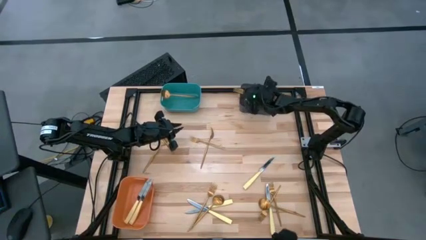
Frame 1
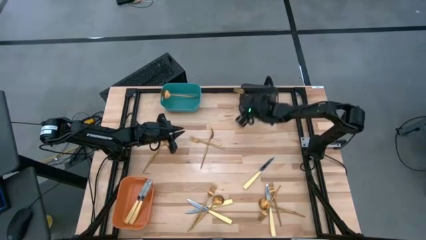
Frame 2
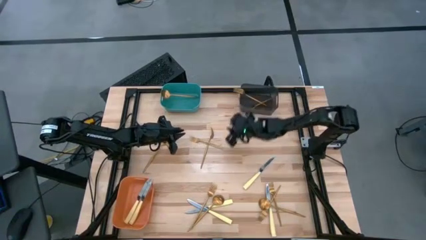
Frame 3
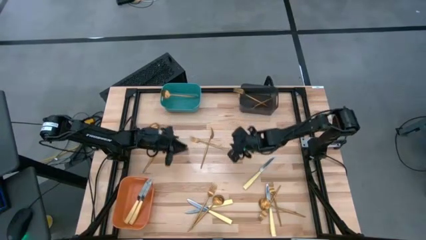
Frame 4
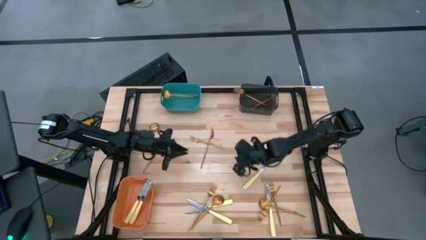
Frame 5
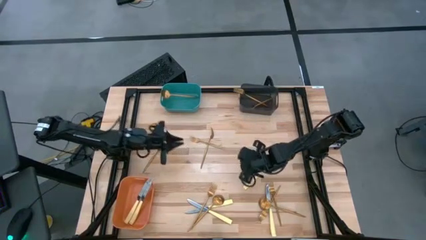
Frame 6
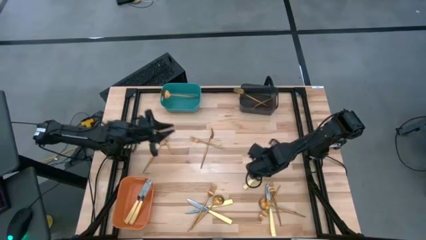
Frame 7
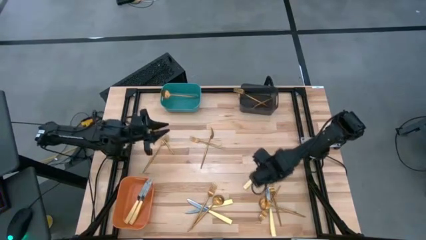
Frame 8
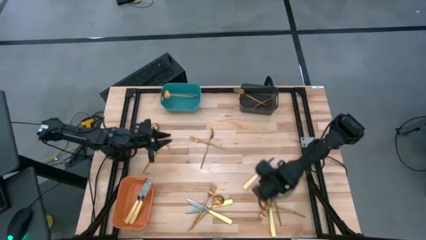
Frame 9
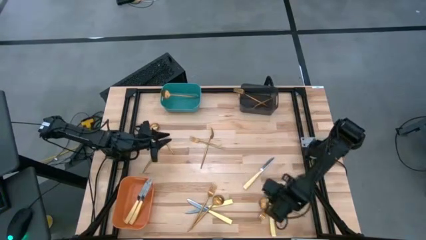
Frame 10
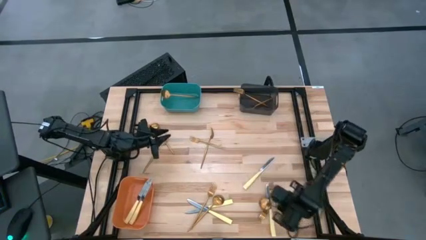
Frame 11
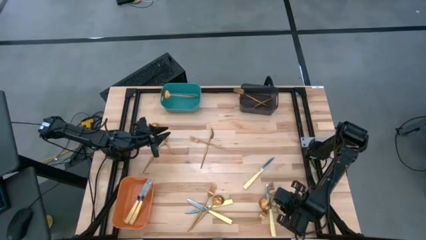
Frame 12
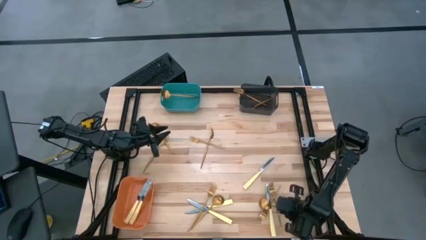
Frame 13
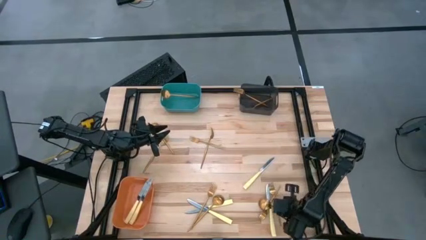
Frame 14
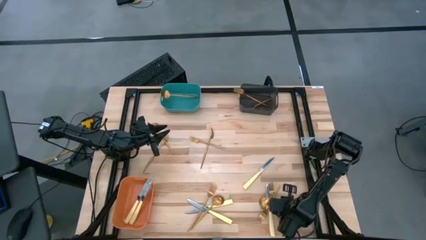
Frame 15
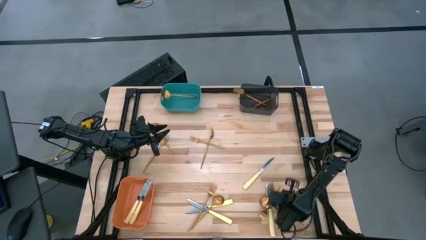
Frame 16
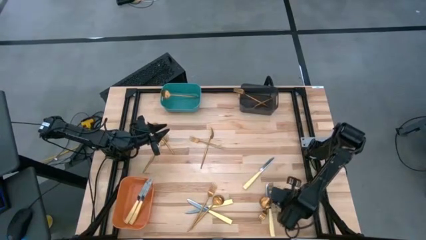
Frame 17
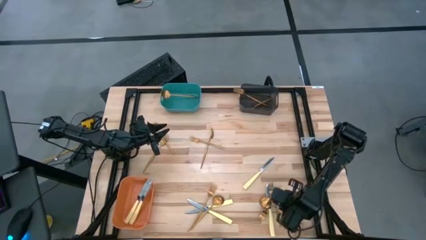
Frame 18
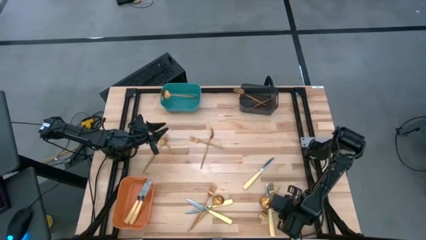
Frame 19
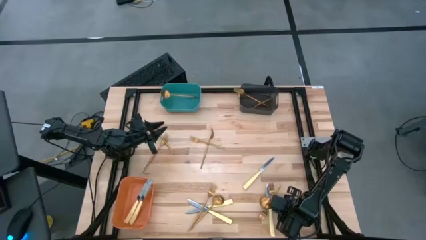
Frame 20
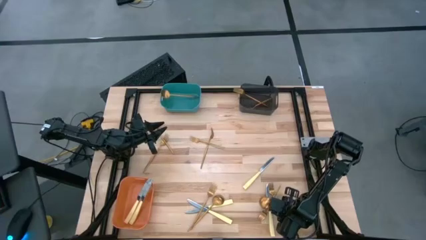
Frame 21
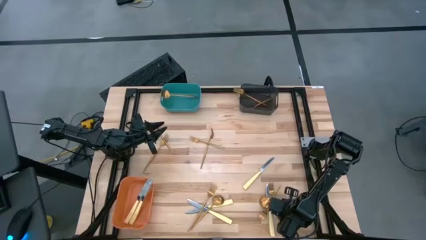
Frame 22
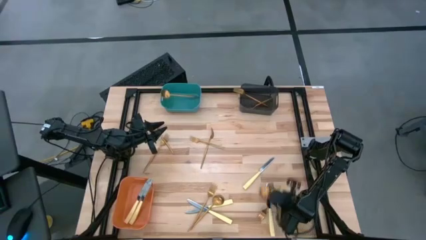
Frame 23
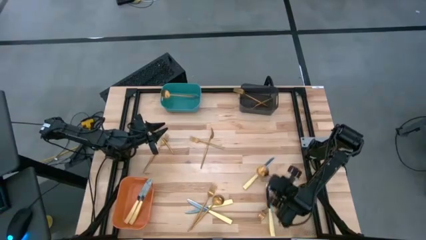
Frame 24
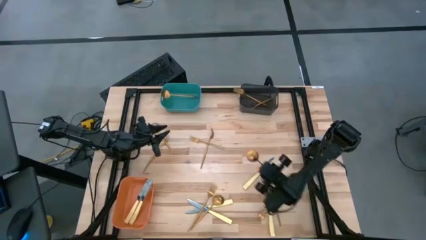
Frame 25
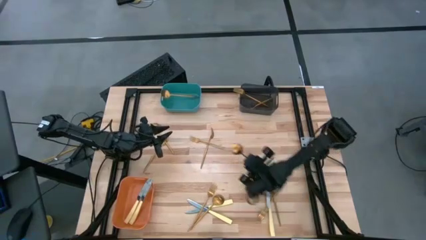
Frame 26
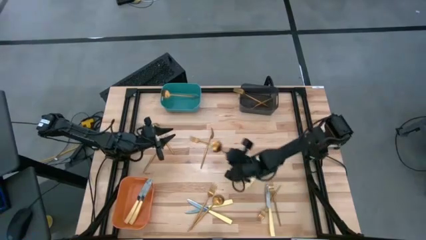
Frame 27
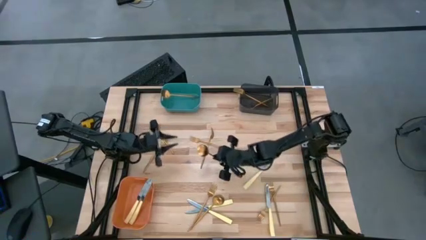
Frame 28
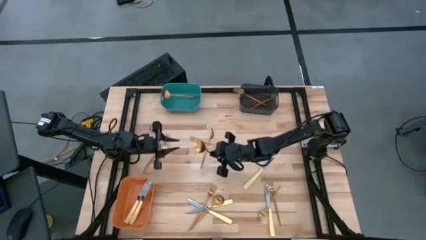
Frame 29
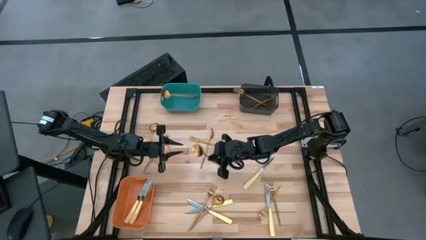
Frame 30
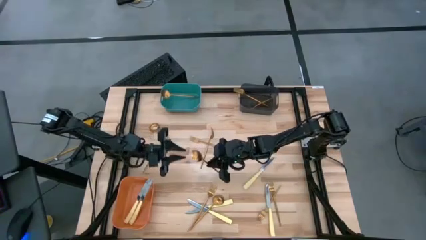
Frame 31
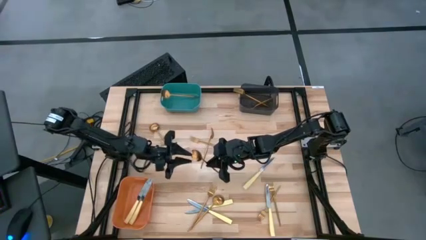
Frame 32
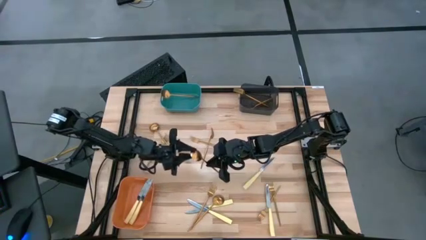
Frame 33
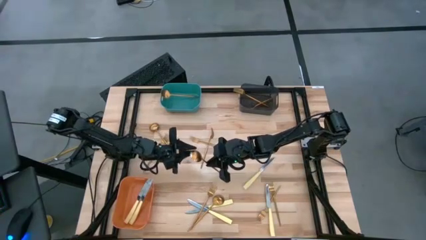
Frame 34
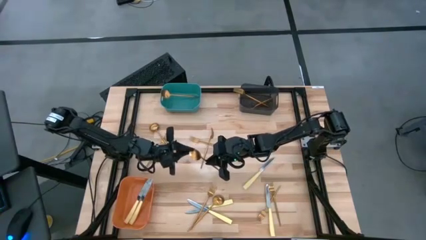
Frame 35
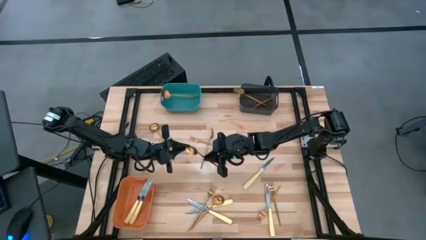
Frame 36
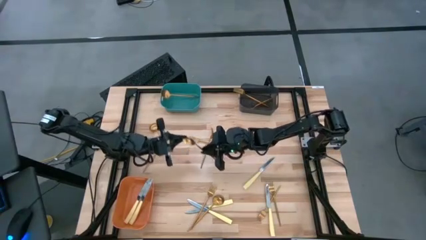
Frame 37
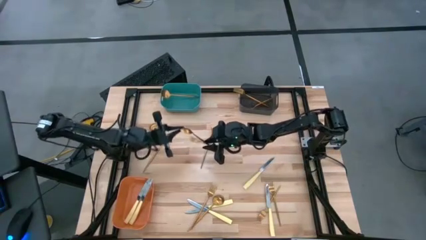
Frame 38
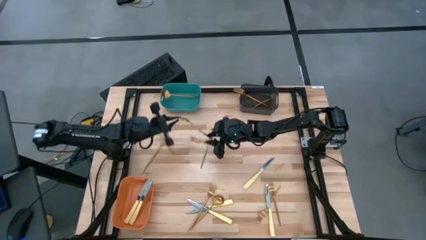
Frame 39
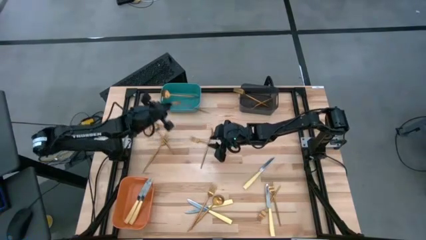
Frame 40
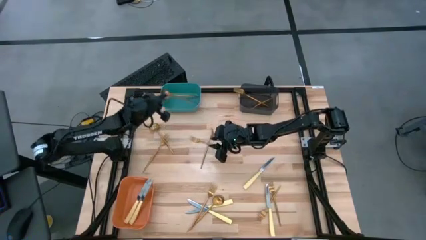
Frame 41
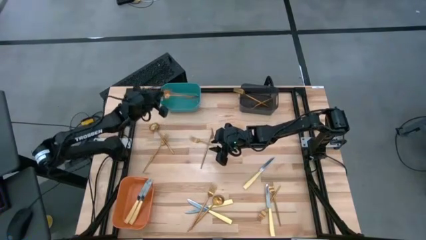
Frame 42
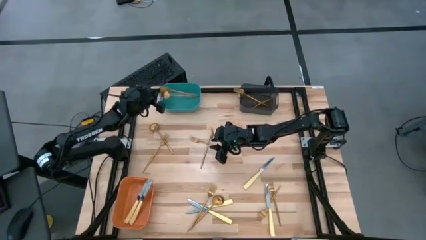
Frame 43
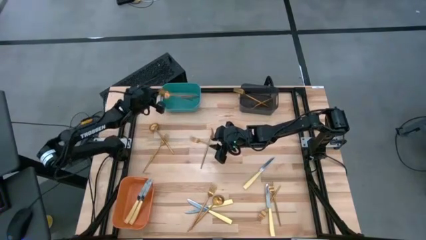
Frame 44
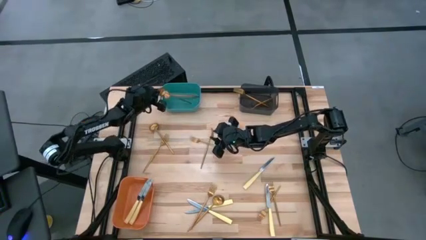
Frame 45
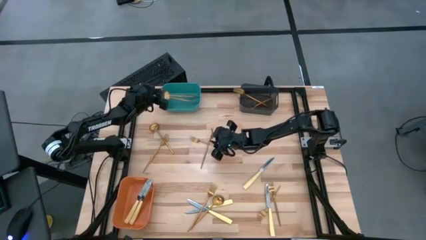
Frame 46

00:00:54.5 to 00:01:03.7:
Task: Sort silverware by color (type)
Put the gold spoon into the green bin

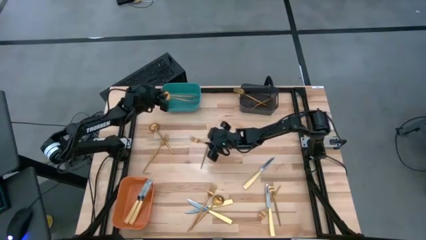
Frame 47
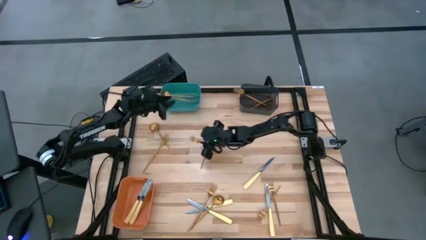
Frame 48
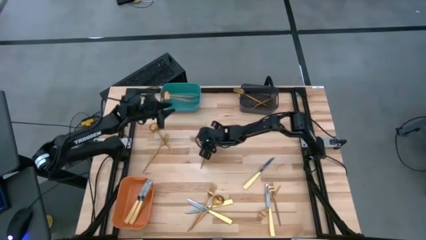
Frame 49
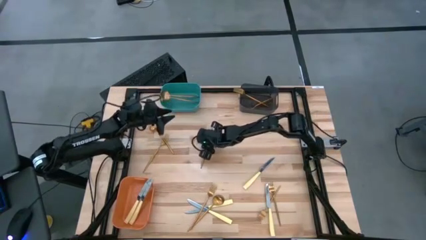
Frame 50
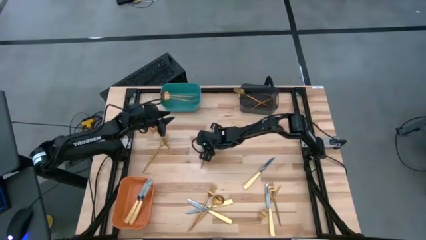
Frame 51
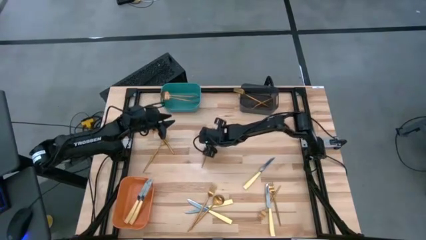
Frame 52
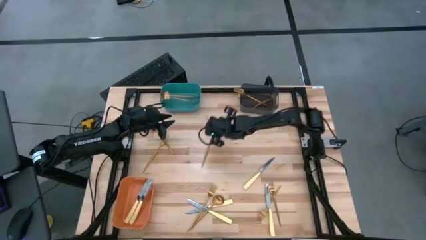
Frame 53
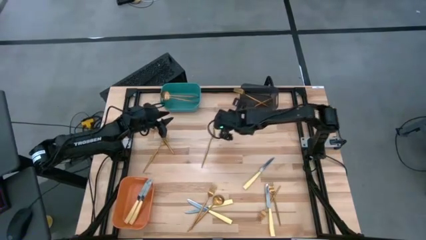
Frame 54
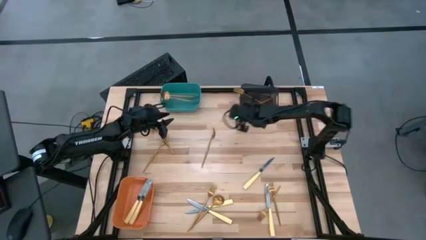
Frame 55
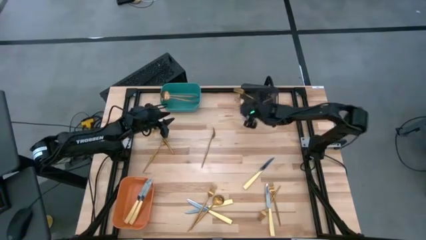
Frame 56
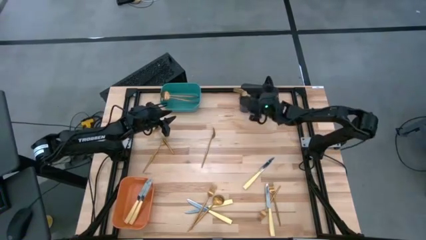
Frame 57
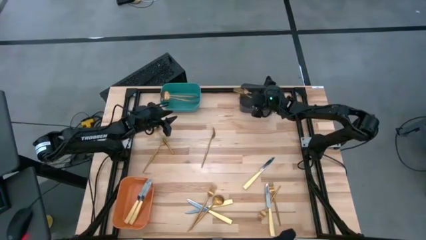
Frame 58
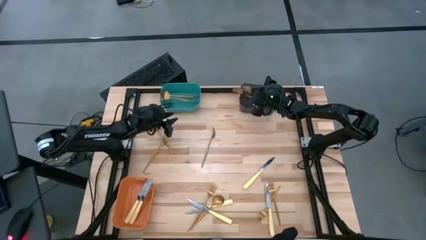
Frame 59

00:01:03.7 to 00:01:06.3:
Put the gold fork into the black bin

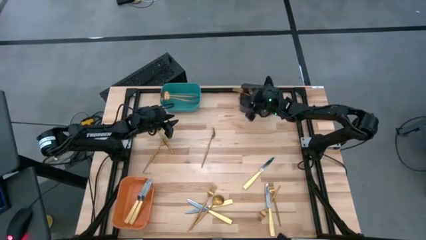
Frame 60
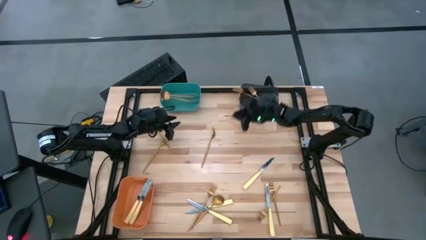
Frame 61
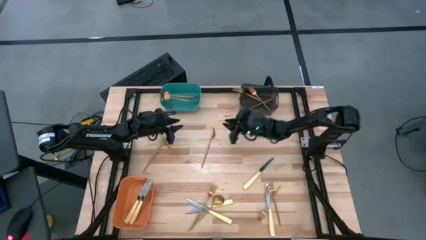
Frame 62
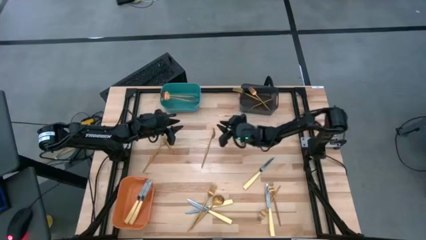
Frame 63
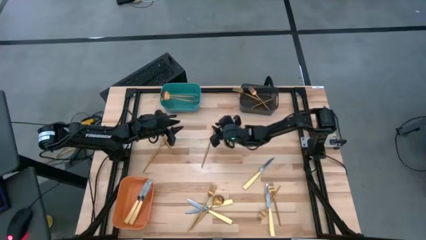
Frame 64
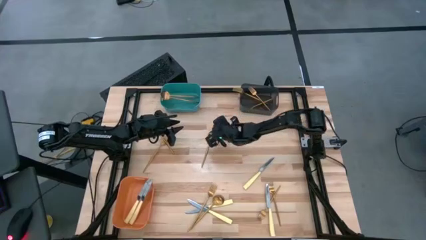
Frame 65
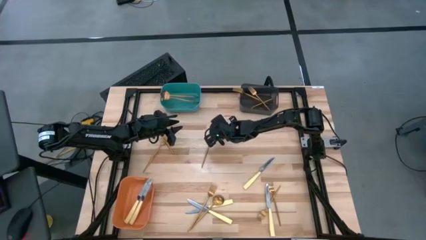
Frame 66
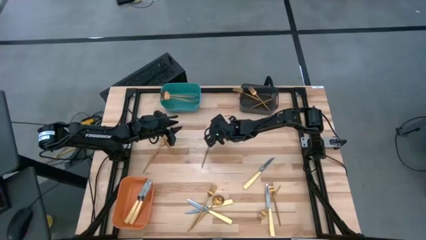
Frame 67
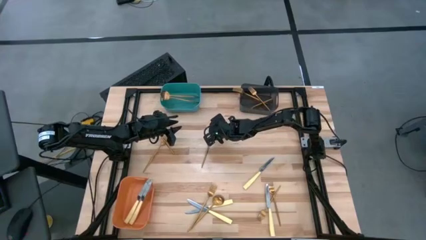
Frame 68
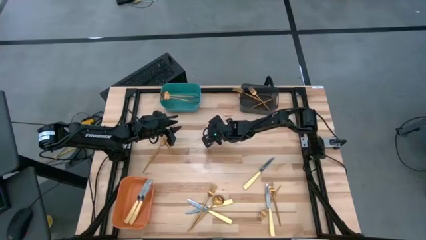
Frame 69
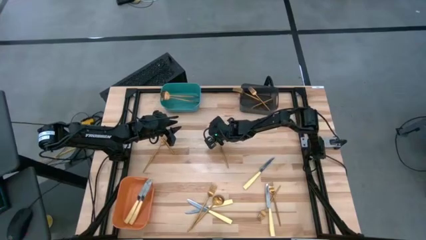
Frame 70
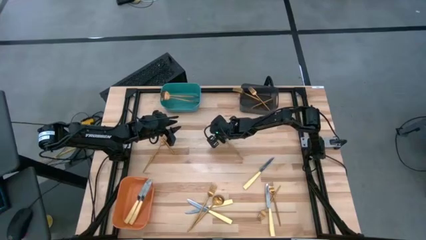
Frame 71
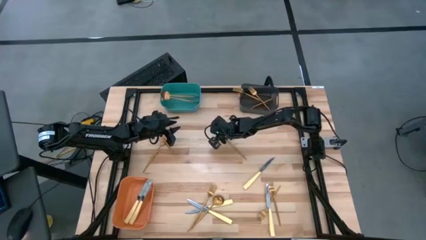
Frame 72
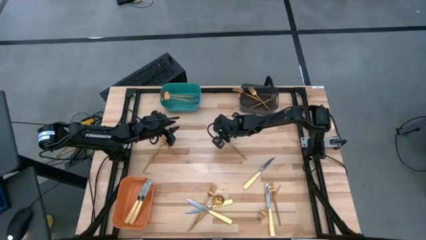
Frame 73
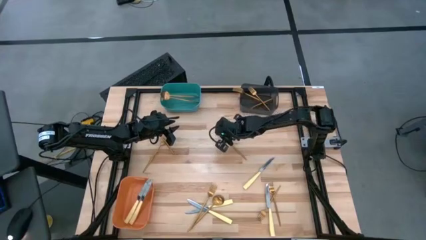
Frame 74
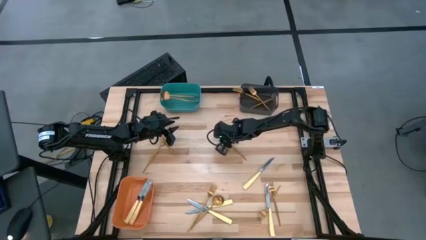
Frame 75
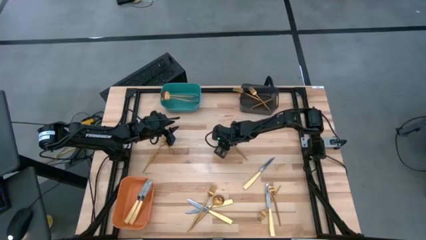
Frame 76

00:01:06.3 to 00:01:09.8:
Put the gold fork into the black bin

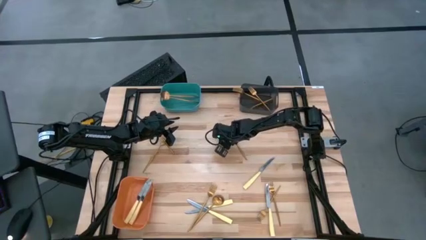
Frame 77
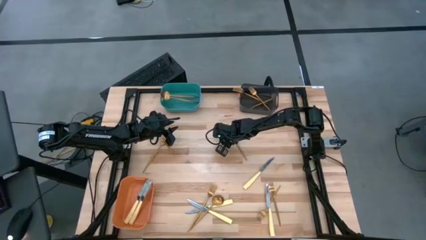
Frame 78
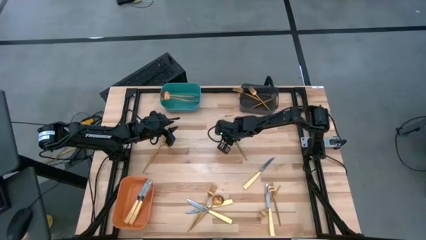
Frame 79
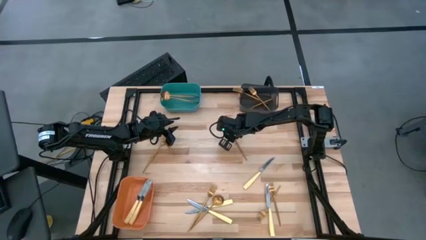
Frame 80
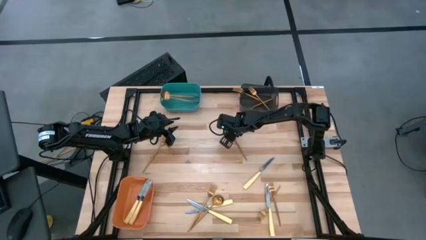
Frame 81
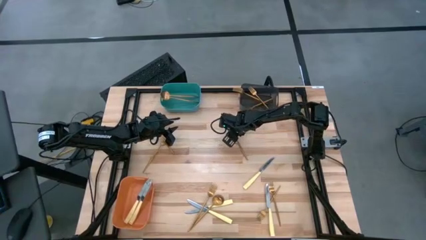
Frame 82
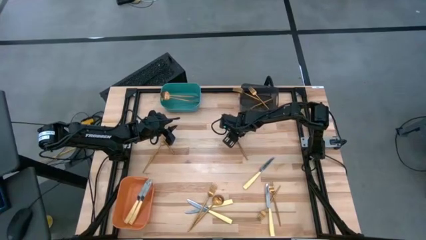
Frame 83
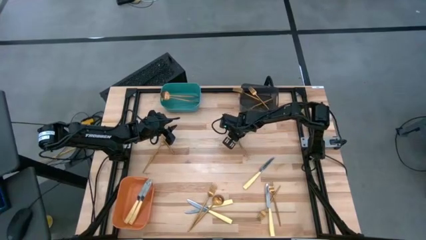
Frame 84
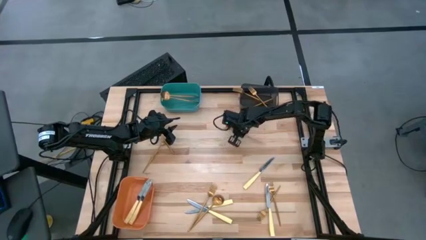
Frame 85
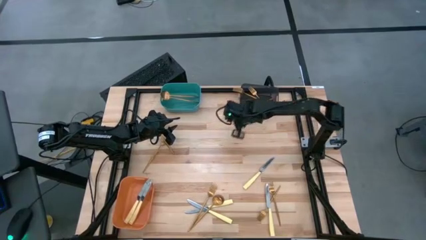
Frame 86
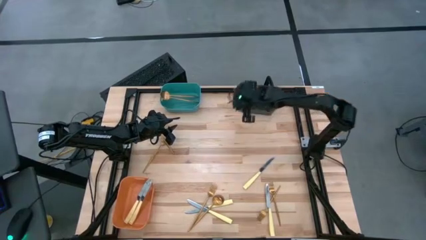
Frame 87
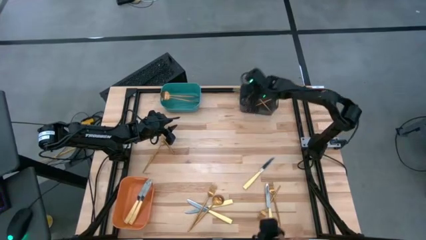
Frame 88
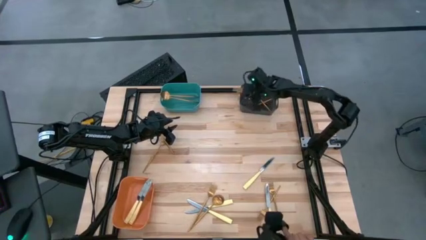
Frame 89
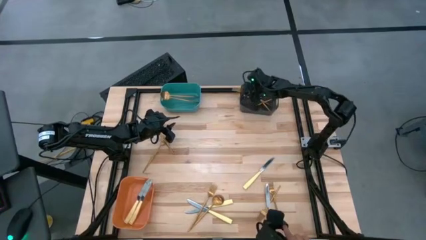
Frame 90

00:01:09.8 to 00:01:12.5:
Put the gold fork into the black bin
